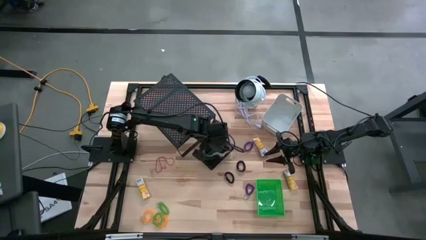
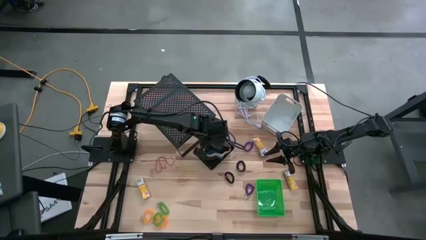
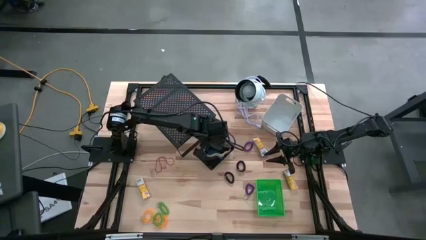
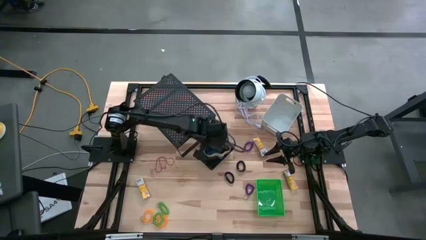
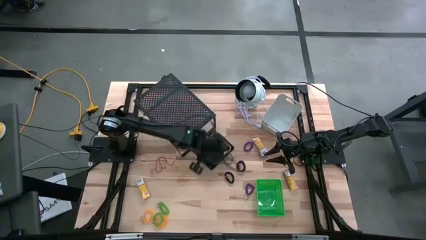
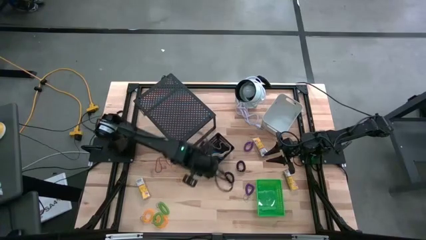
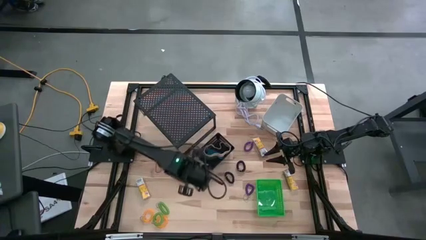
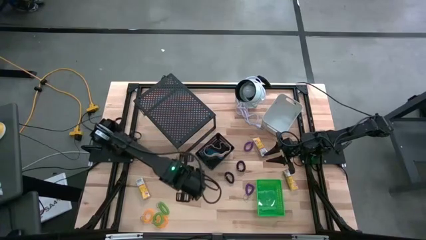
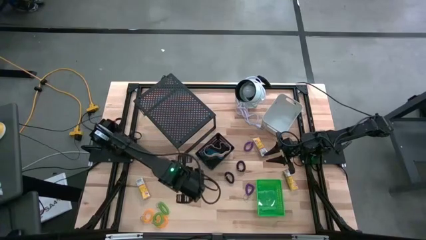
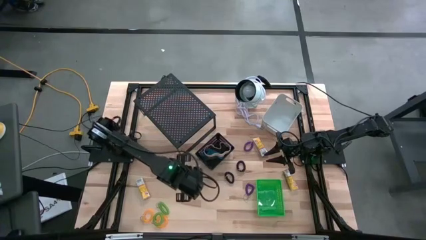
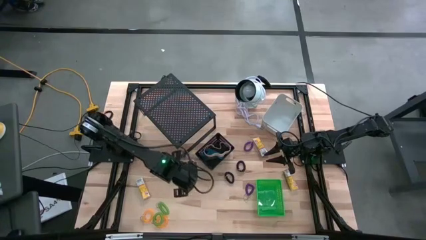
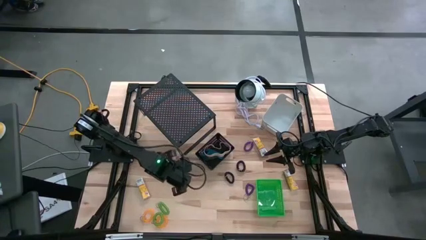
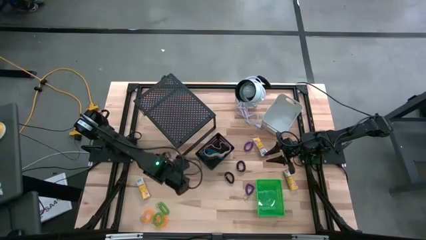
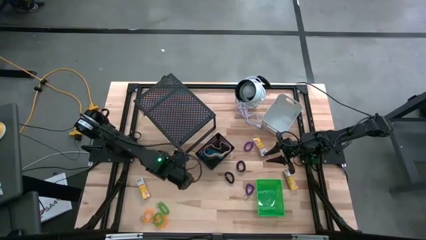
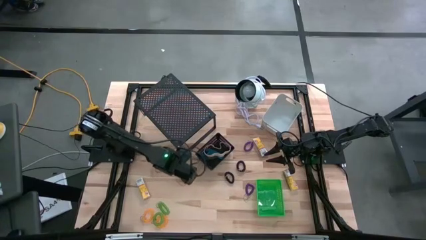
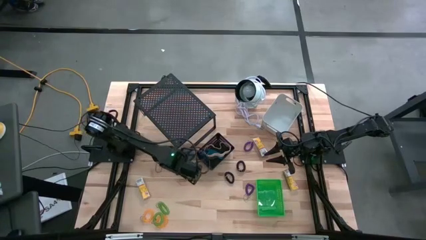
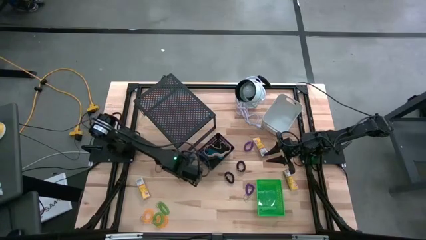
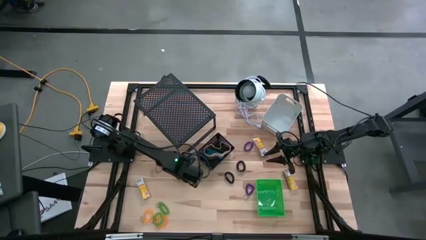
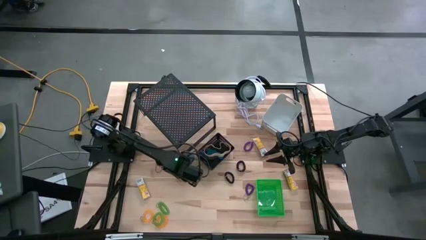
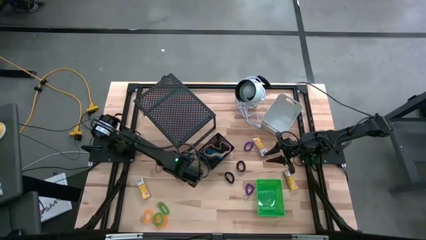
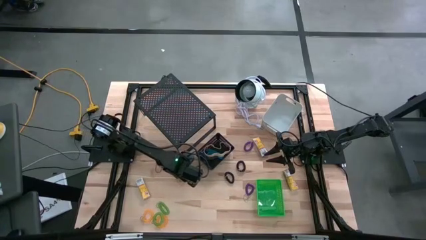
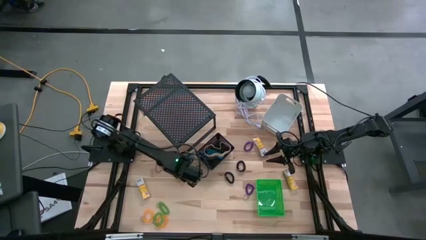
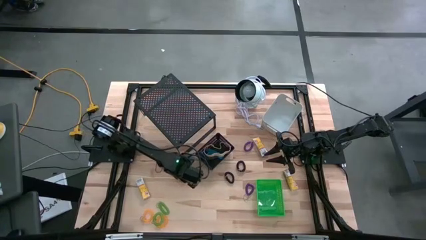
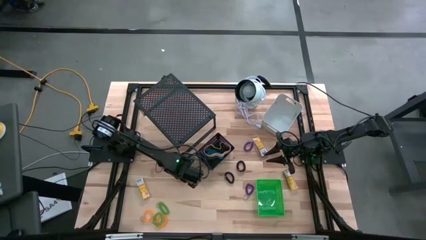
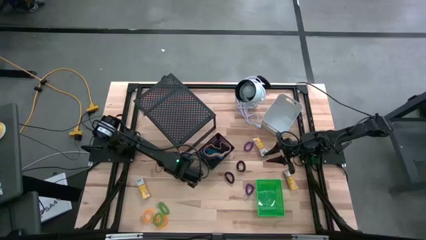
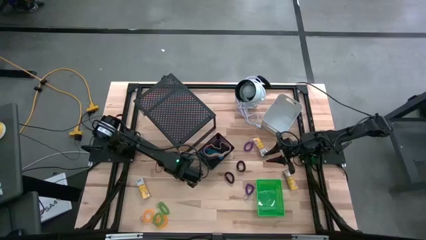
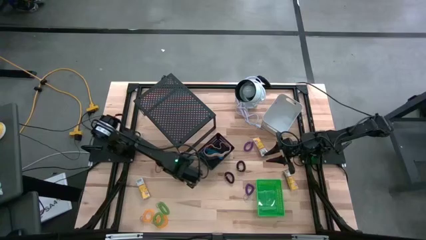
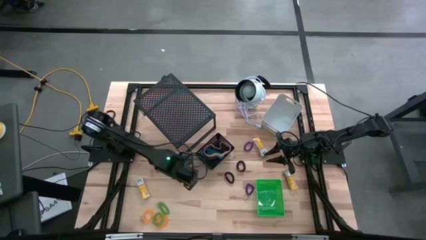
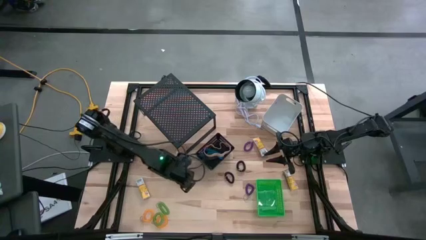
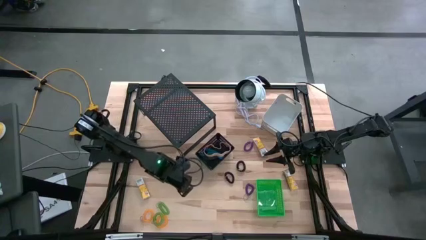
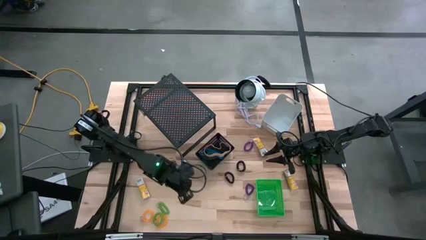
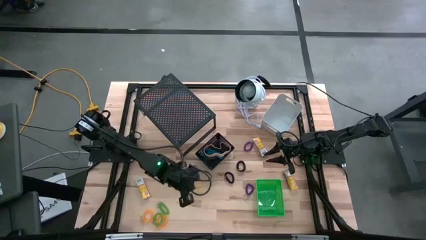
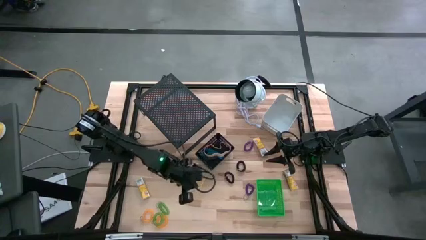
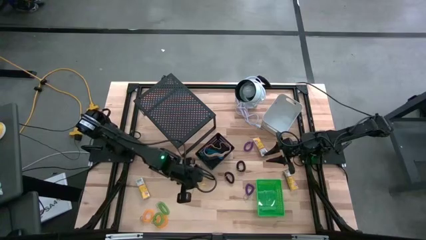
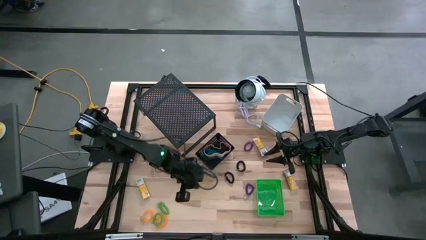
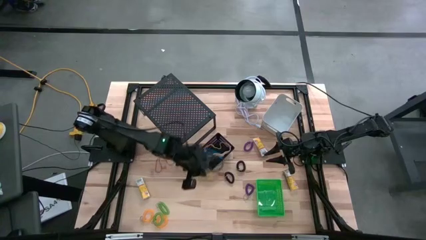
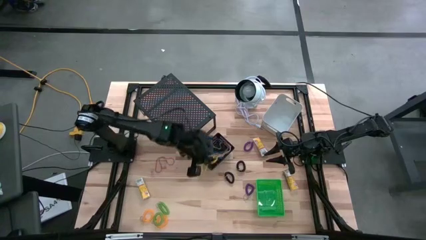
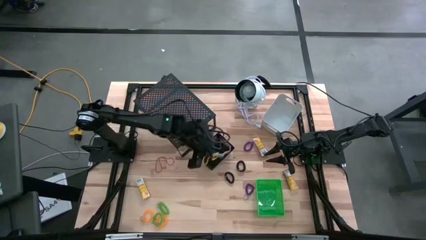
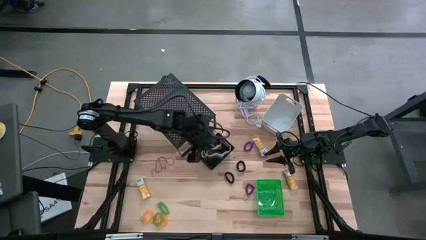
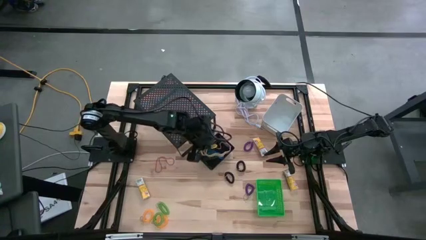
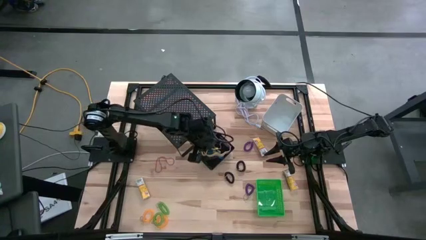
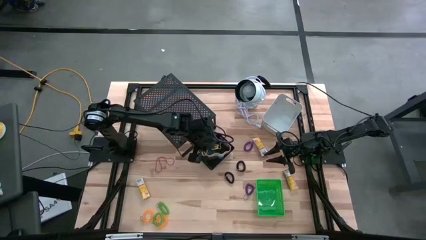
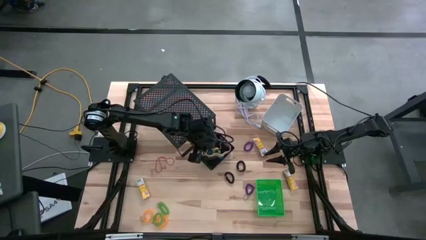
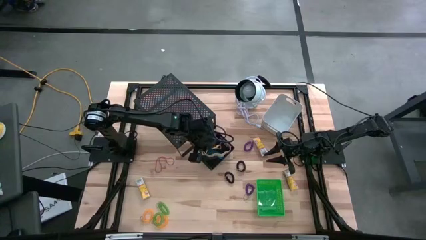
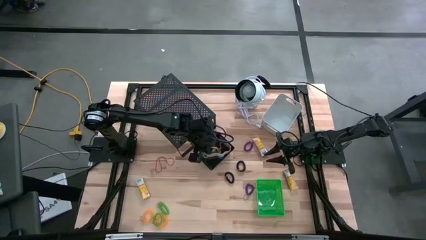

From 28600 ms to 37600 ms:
Task: Pick & Place Office Desk Supplies
Put the yellow rubber band into the black bin

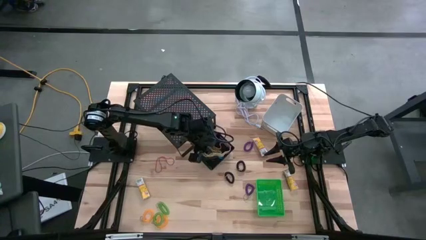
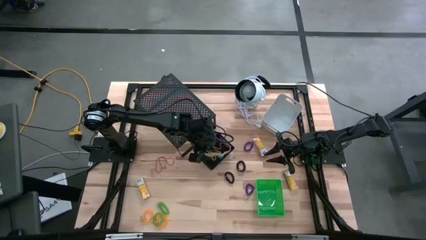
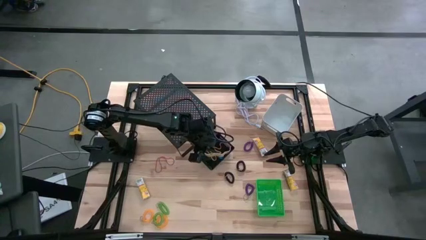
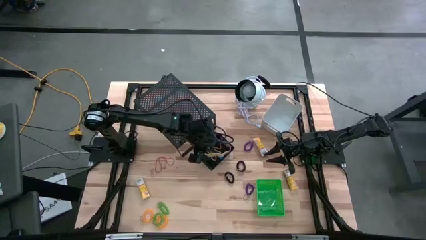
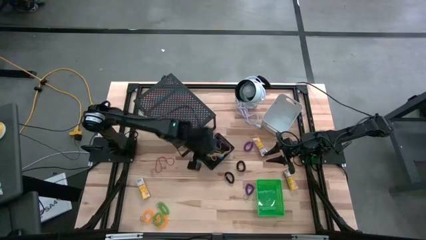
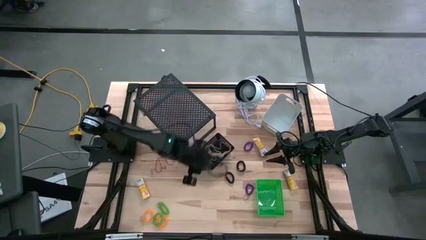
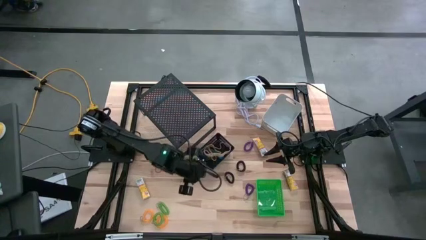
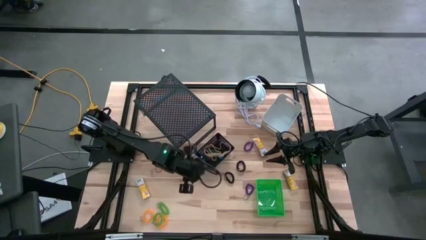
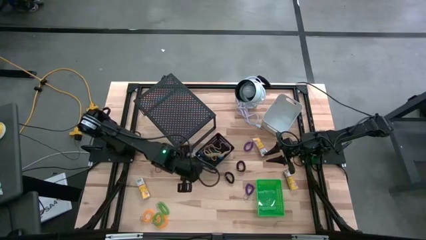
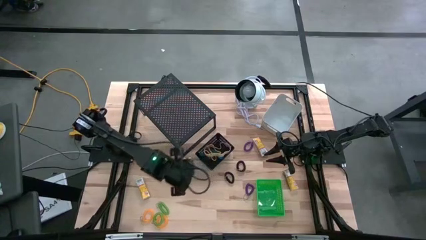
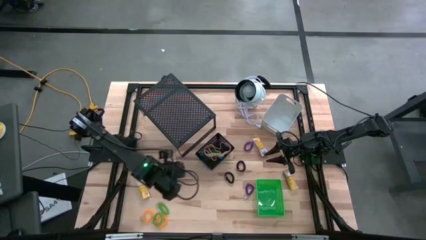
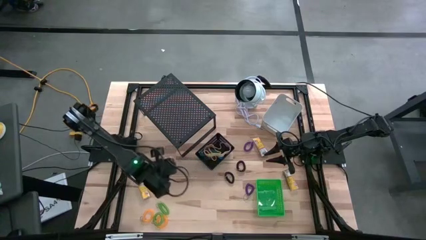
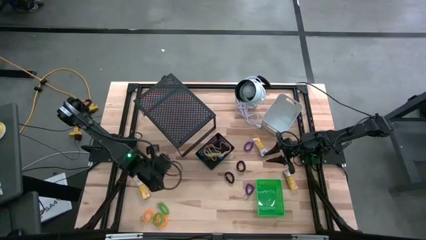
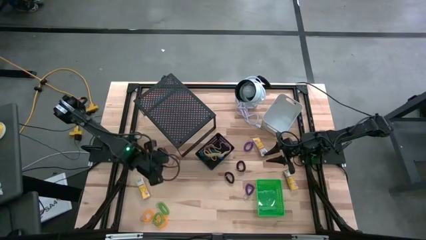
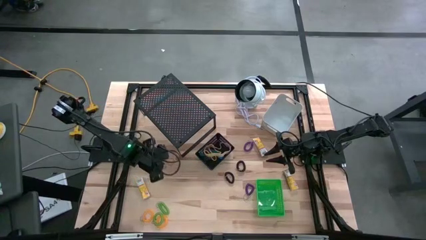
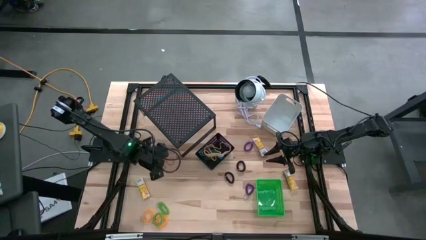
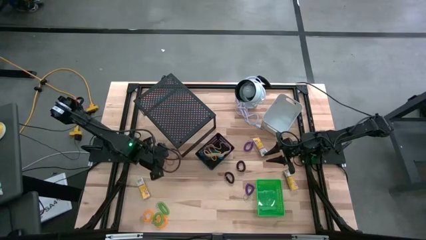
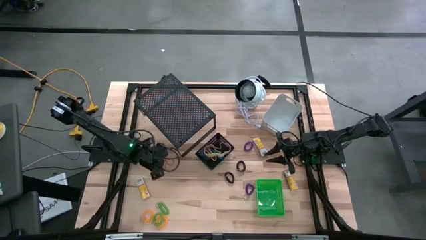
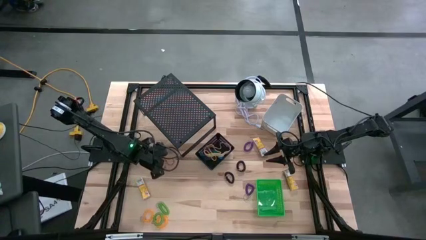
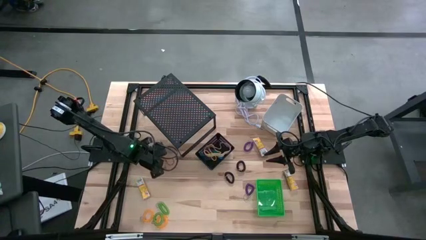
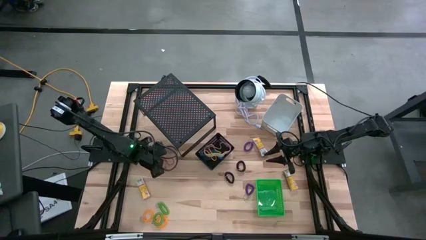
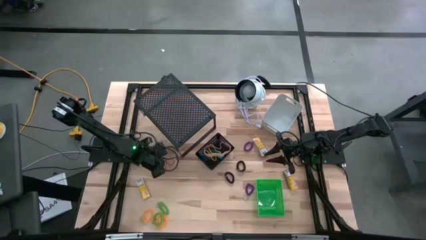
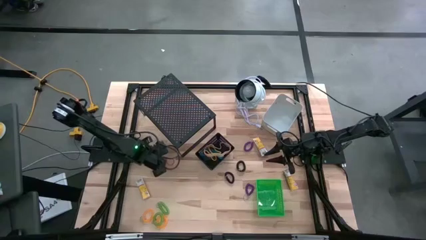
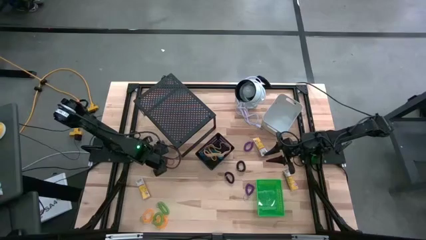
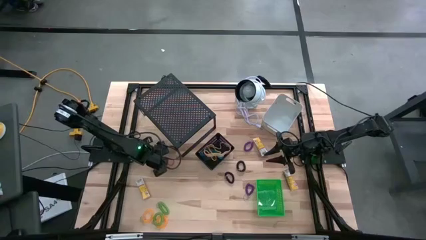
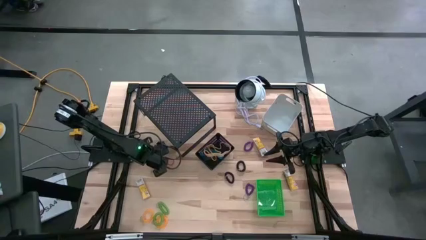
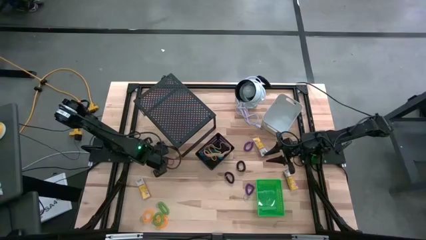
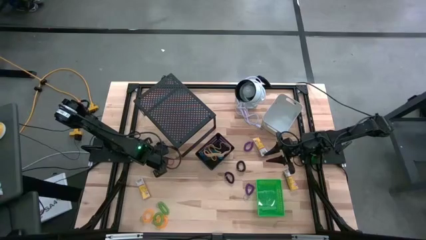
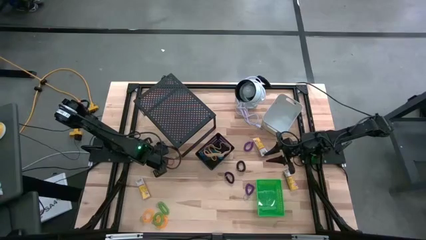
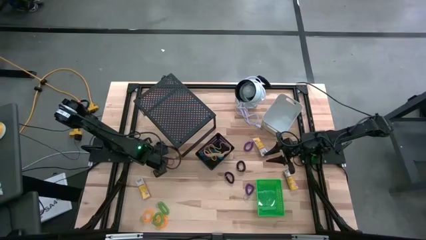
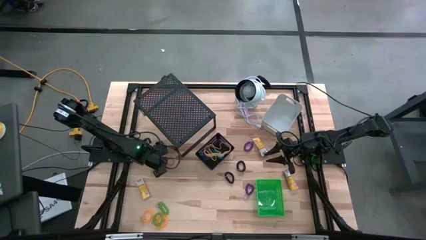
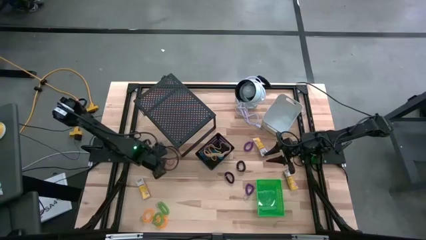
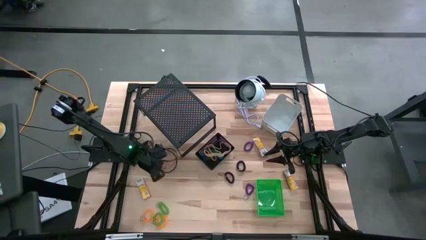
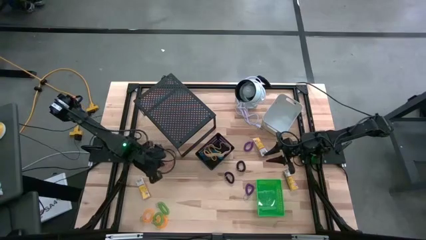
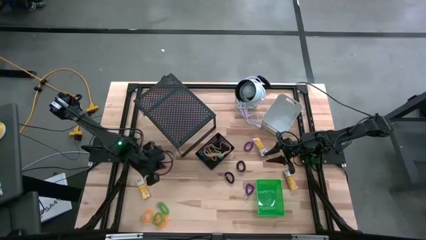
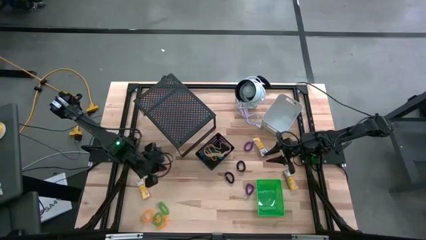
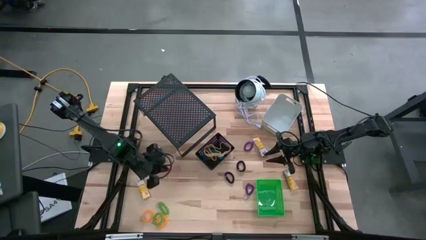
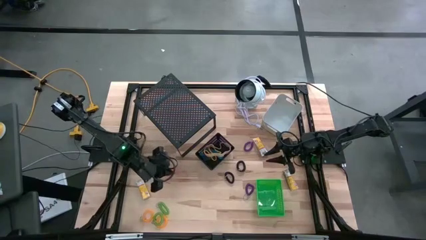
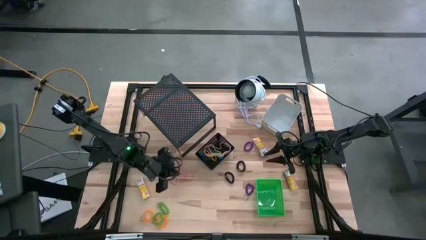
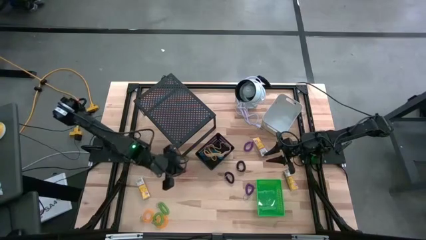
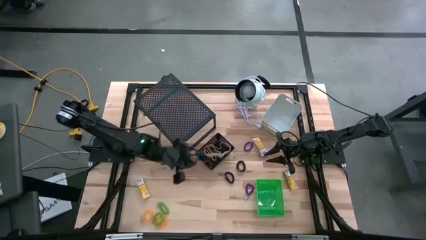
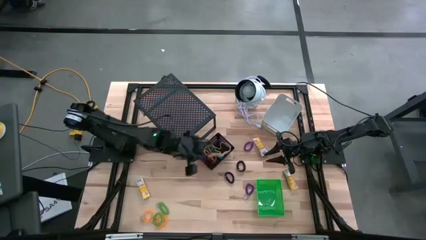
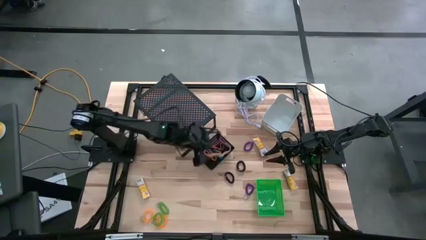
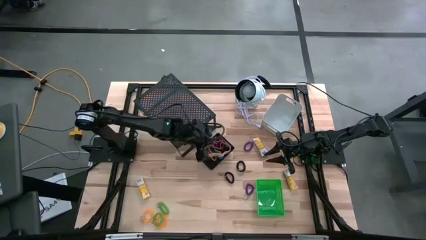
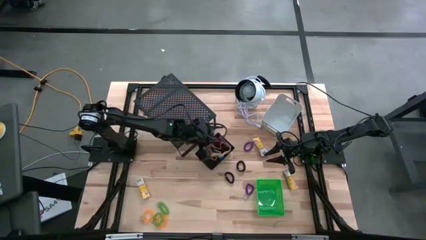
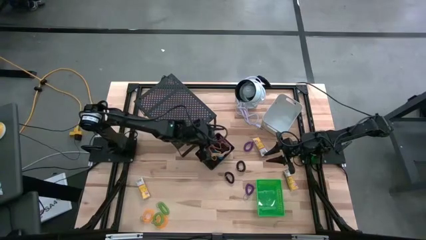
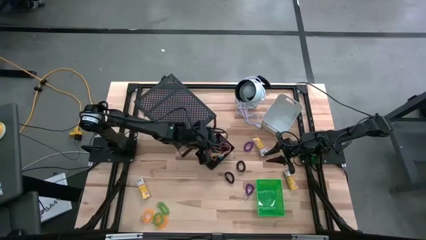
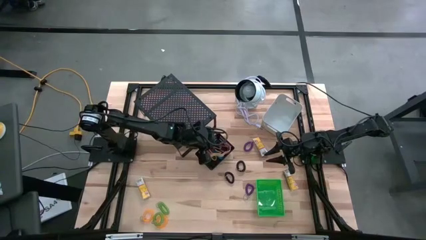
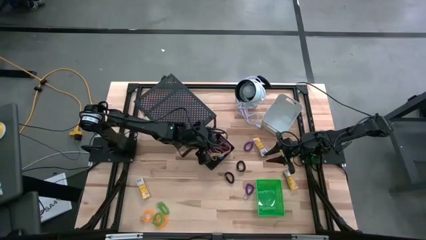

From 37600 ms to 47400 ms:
Put the red rubber band into the black bin
